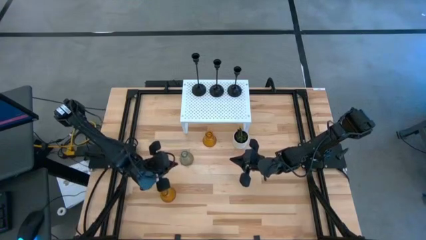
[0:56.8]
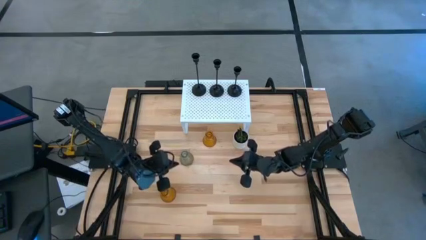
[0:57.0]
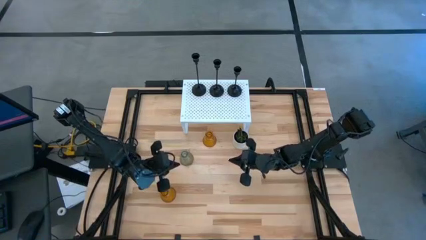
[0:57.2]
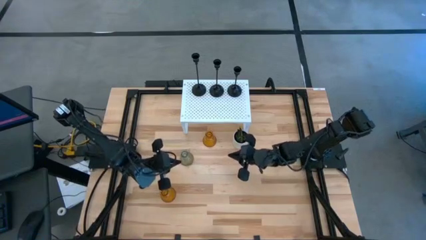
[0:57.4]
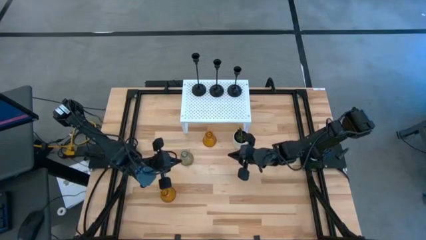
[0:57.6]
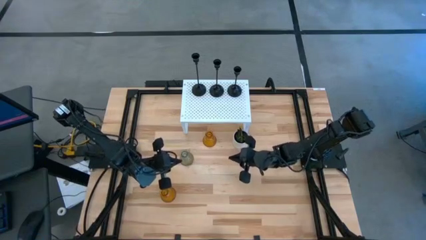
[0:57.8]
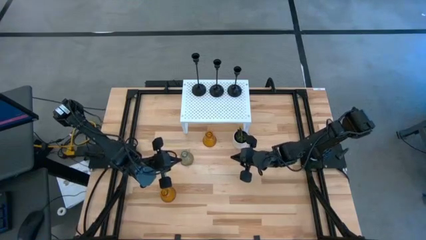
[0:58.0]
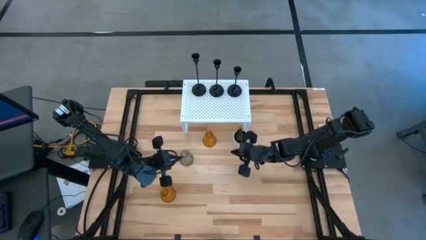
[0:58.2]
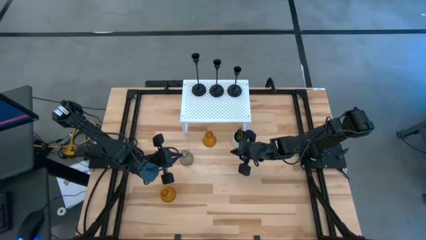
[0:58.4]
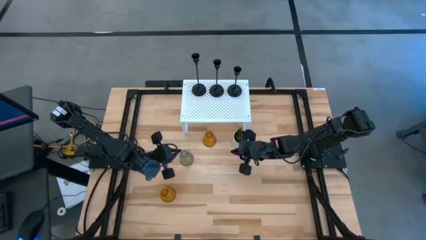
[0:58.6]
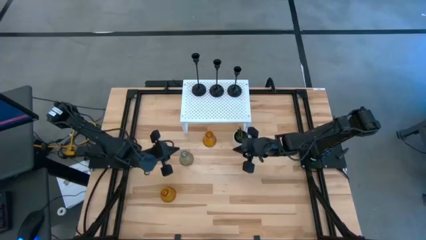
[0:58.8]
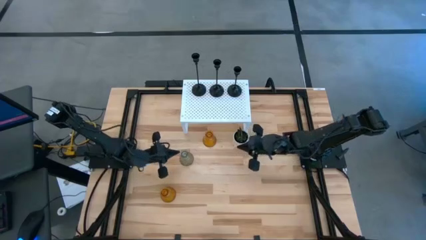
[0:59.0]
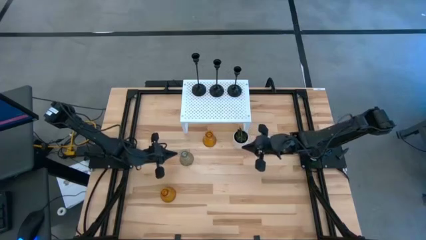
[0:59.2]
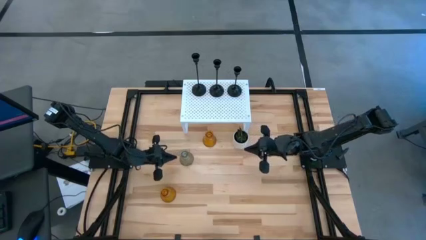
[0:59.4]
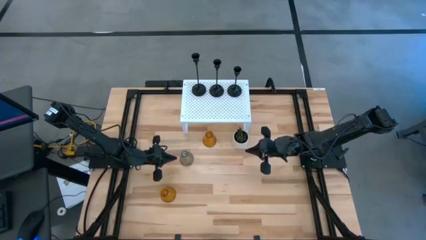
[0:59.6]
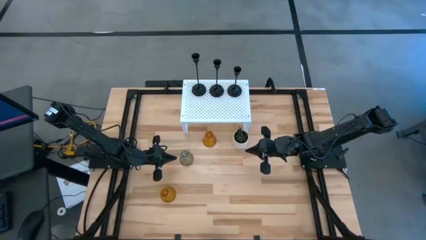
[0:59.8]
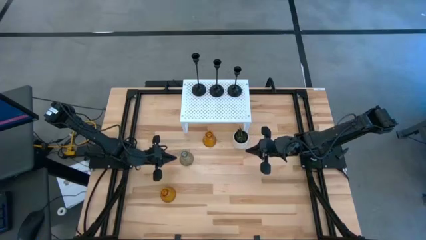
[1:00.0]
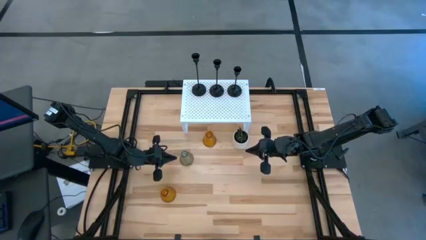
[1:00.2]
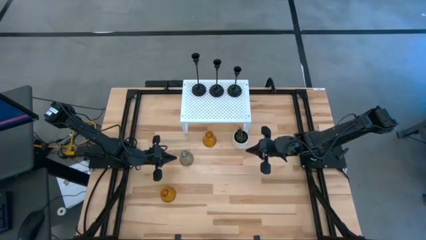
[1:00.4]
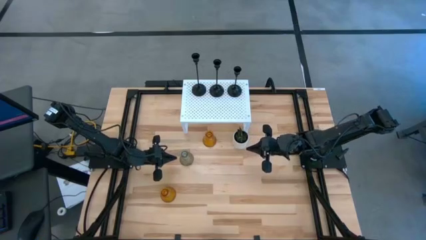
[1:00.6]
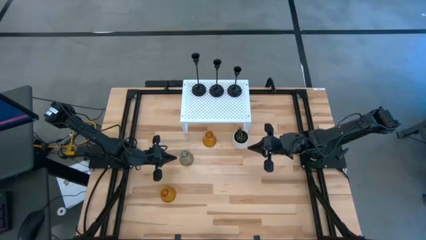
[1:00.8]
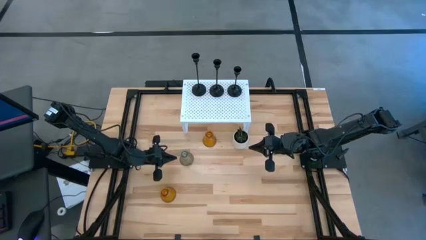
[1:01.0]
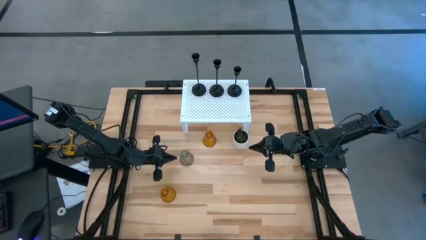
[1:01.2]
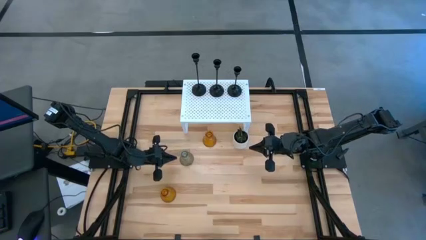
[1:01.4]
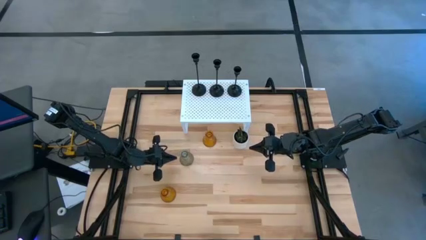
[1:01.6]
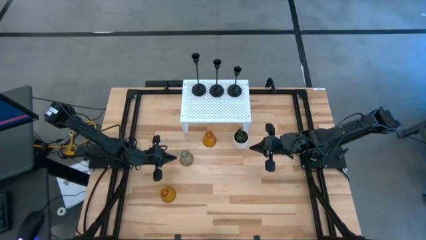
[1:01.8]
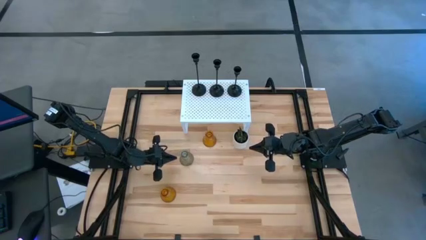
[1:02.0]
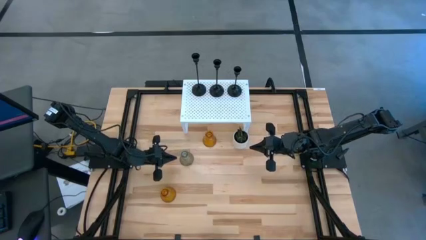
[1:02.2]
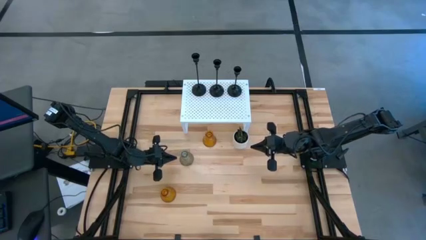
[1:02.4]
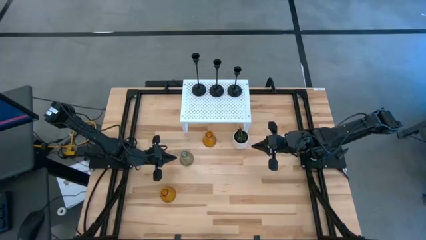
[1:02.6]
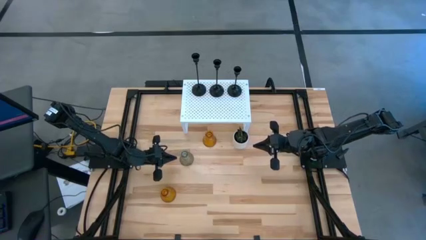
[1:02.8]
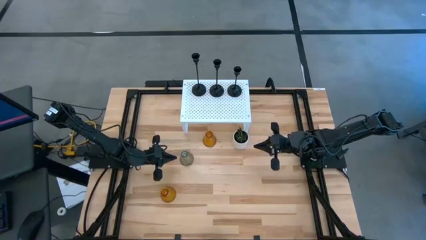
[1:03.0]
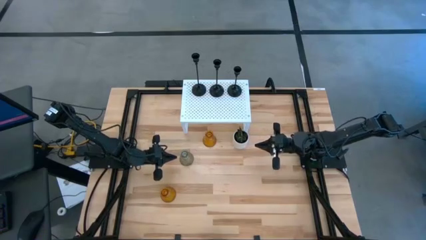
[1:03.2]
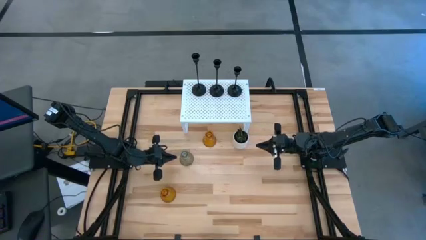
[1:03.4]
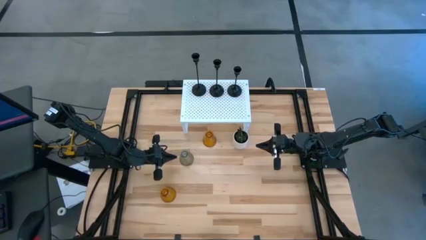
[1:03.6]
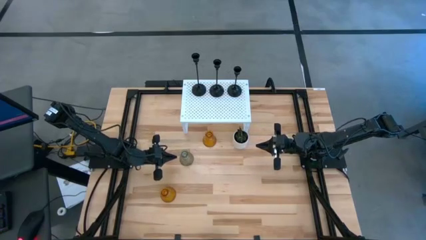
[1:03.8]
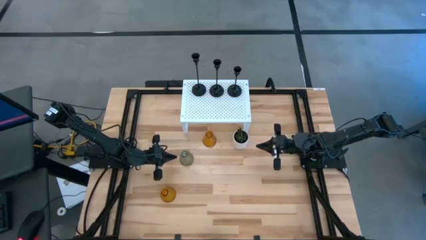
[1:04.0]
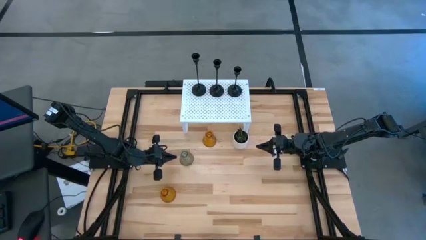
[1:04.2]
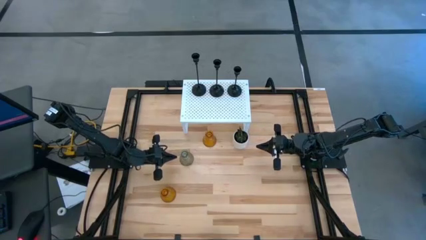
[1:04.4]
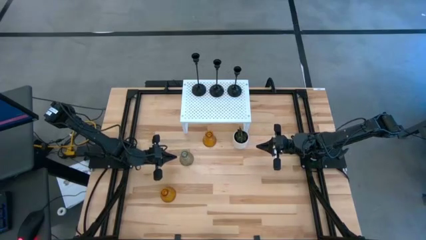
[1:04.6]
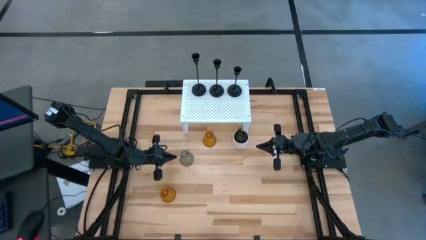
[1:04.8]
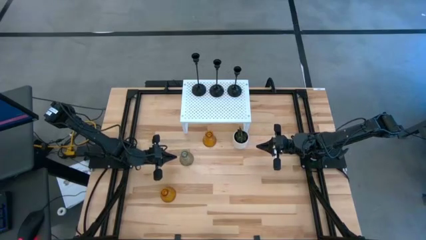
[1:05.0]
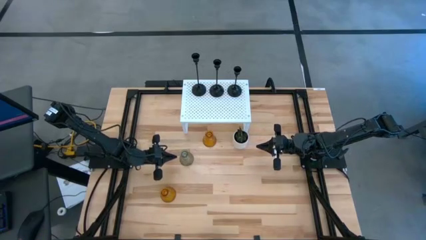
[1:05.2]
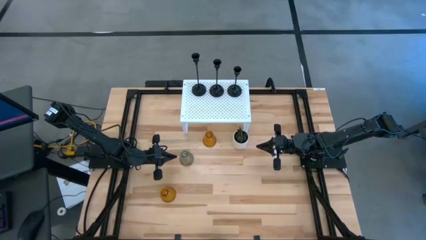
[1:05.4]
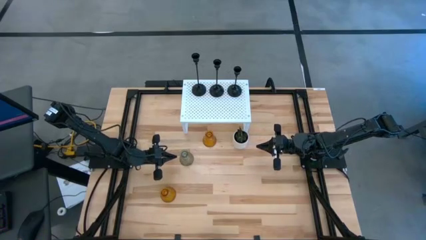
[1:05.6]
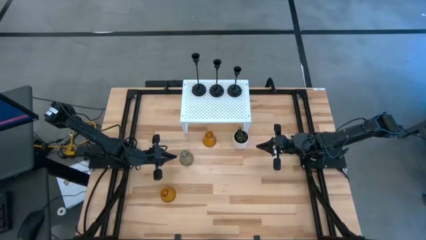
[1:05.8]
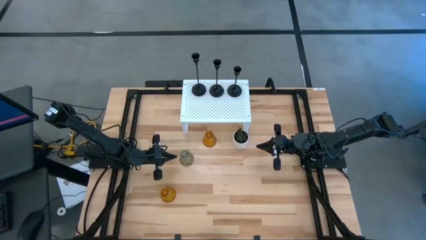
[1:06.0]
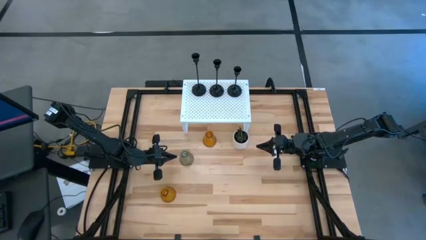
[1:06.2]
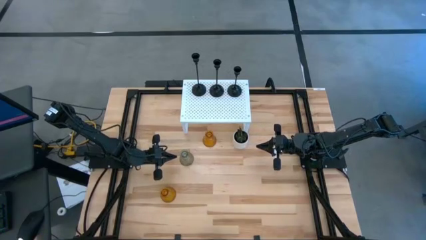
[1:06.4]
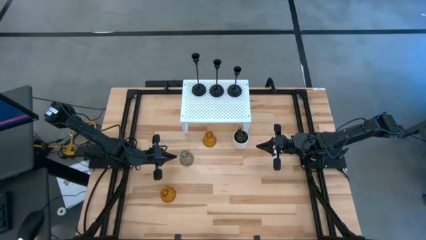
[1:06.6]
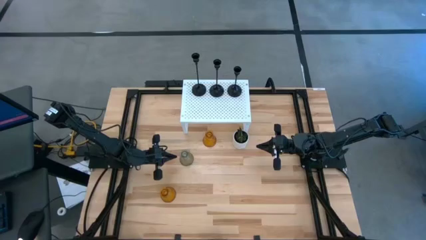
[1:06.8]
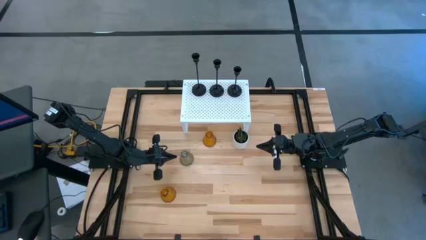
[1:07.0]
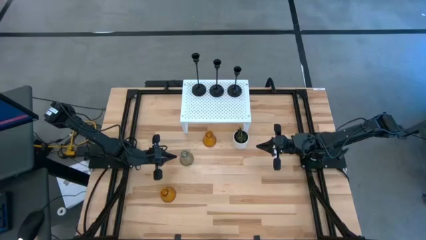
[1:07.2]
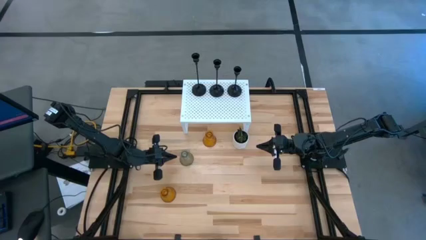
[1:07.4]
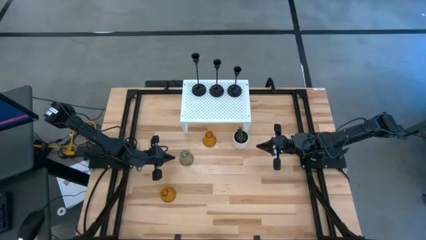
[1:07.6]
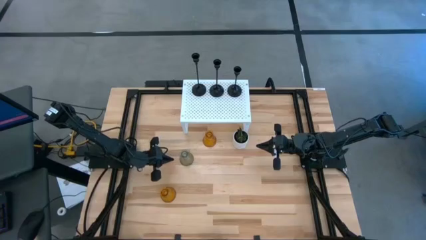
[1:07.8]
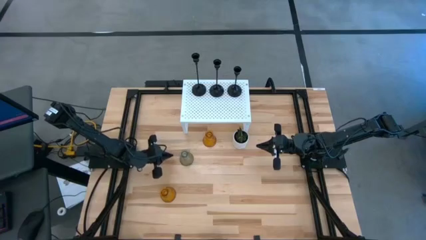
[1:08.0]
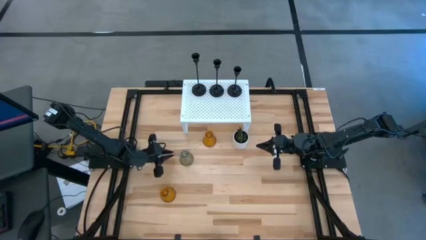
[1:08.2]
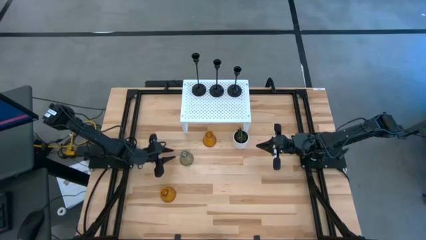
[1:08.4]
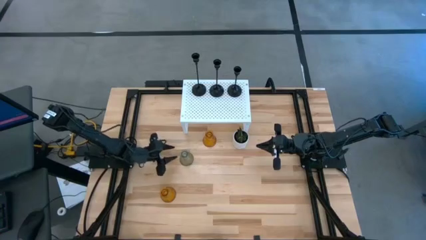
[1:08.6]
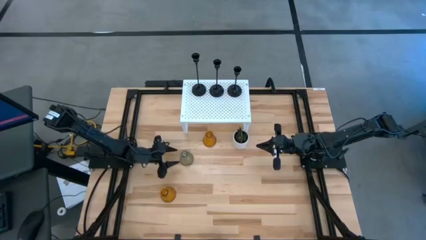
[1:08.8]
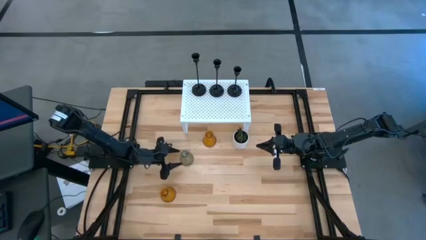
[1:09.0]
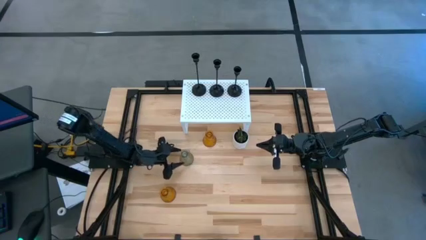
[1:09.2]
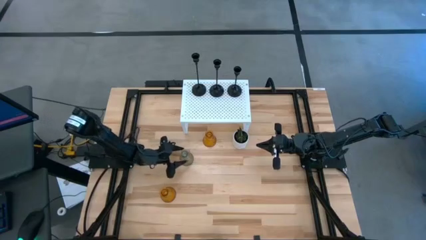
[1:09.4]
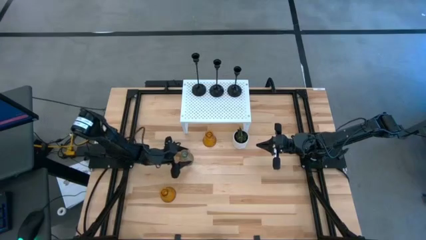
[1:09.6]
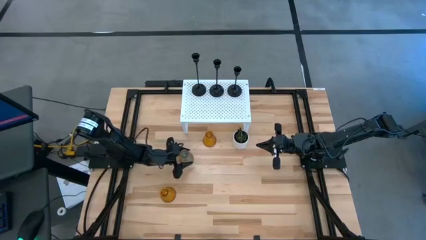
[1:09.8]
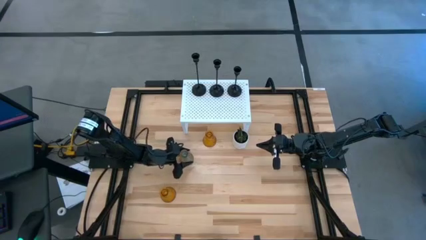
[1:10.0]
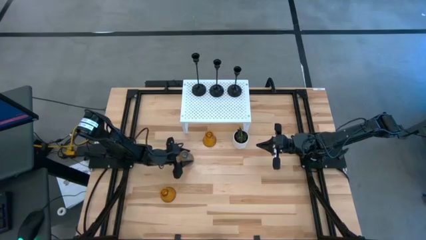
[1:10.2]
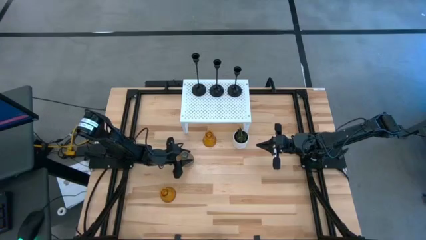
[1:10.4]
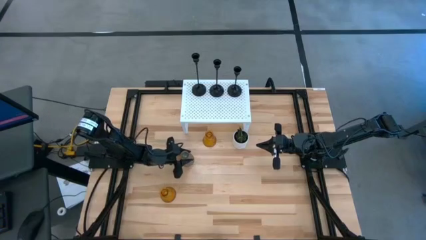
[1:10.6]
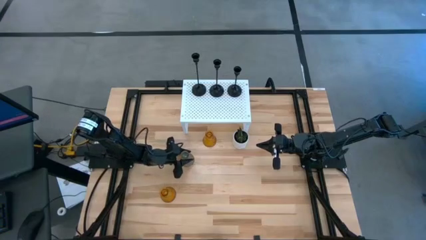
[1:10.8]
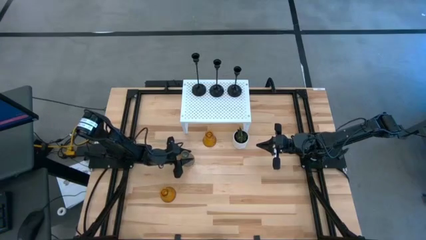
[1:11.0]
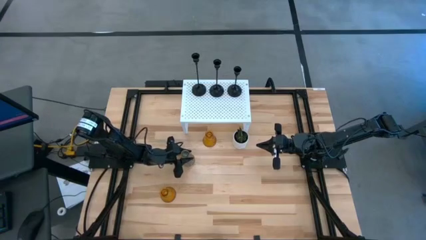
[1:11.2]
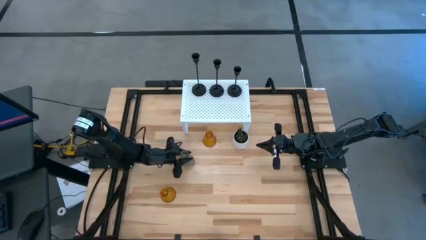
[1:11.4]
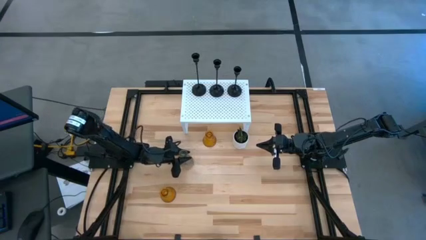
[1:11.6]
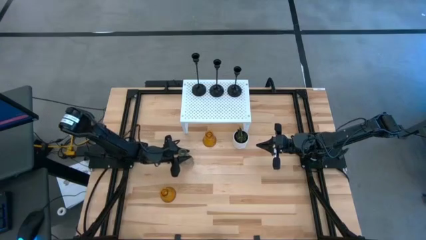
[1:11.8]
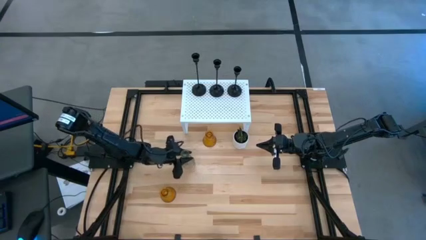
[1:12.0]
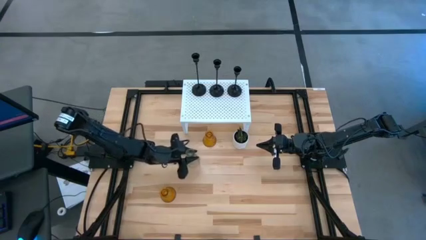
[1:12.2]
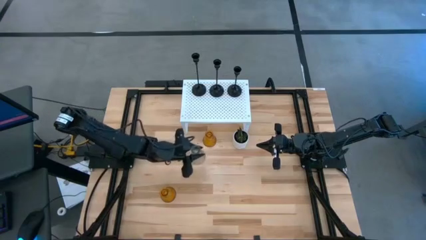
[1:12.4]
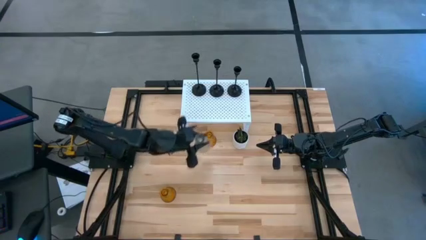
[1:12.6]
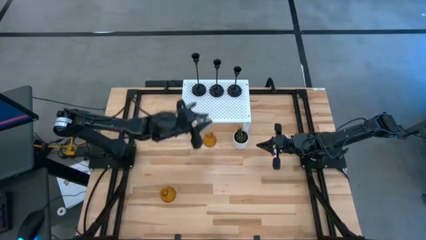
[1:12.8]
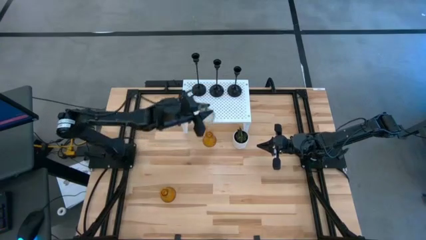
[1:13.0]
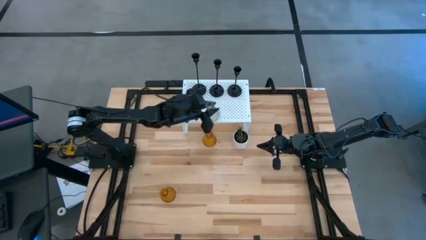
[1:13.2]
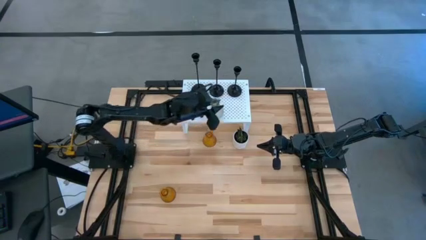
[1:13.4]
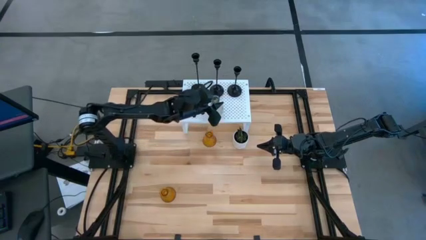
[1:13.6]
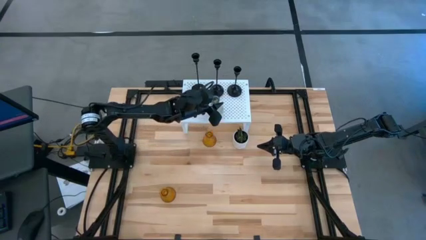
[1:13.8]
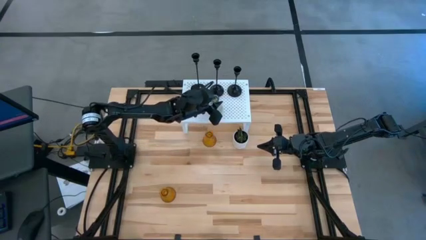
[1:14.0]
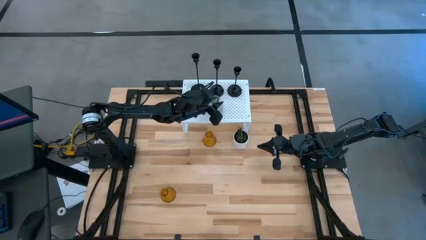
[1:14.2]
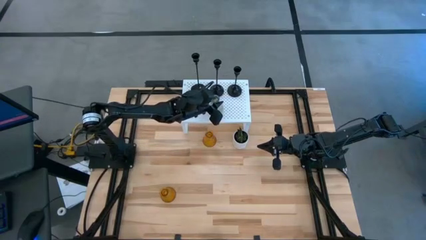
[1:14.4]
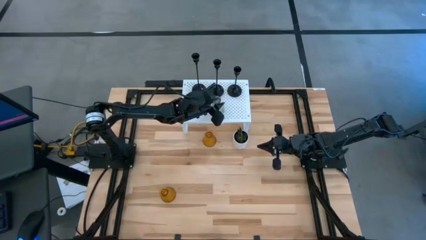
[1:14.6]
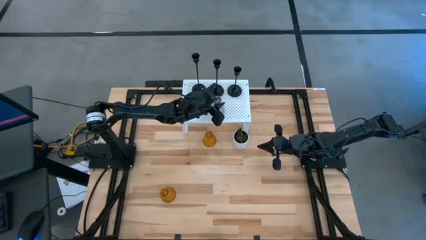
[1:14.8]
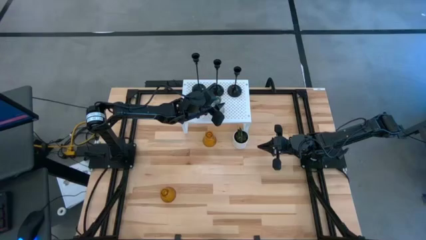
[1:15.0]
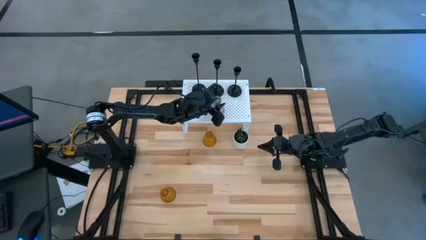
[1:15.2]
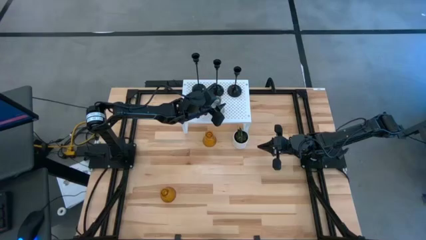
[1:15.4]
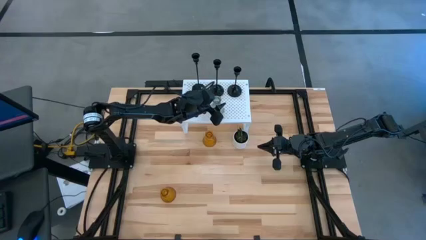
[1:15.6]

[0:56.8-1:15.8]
Task: Pick & Place candle stick holders
Put the transparent glass candle holder on the shelf
